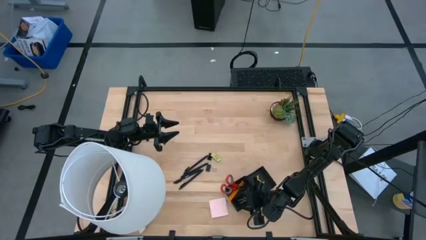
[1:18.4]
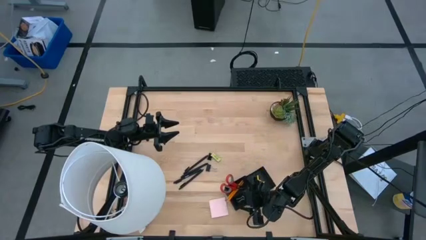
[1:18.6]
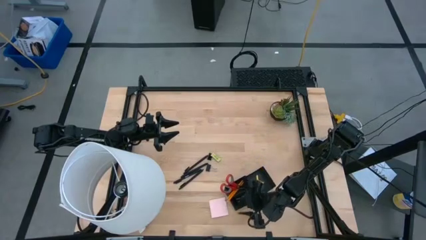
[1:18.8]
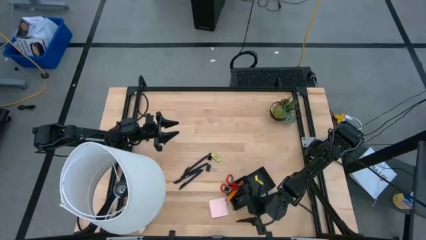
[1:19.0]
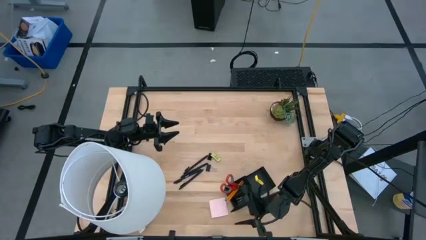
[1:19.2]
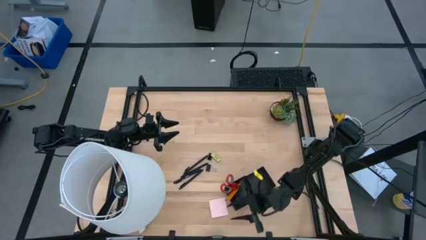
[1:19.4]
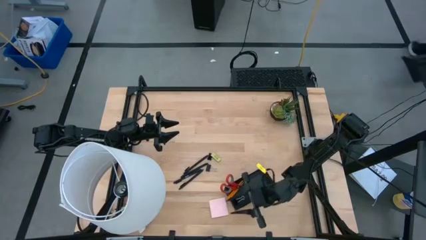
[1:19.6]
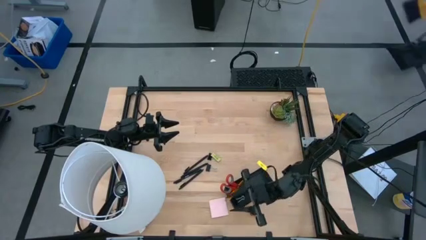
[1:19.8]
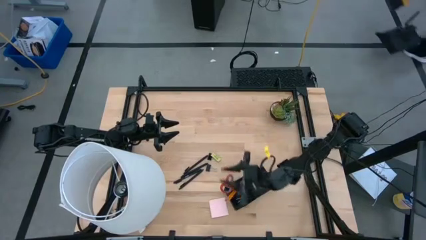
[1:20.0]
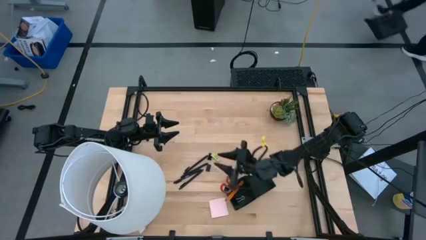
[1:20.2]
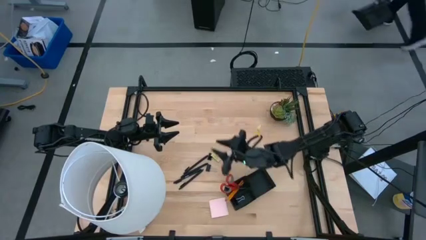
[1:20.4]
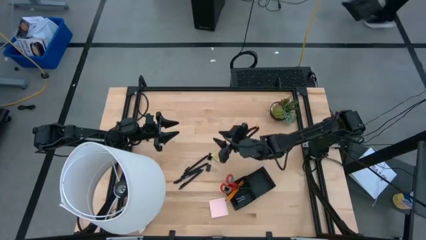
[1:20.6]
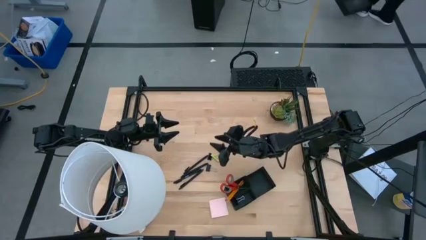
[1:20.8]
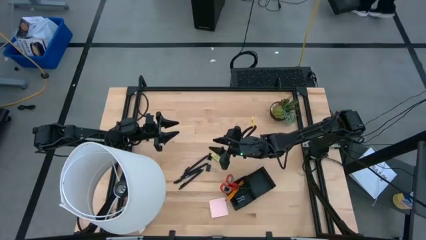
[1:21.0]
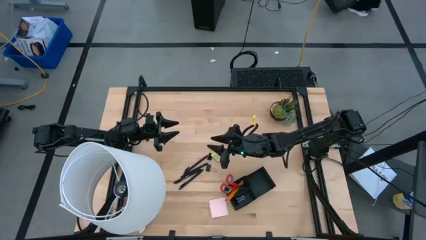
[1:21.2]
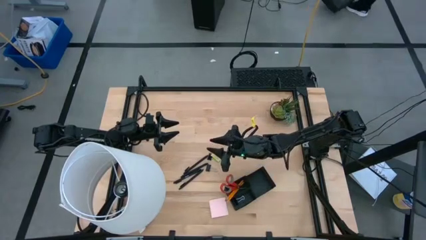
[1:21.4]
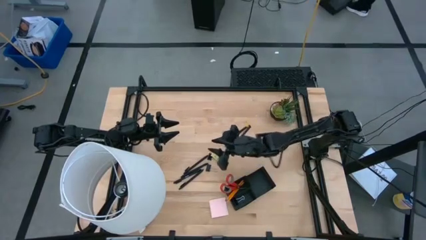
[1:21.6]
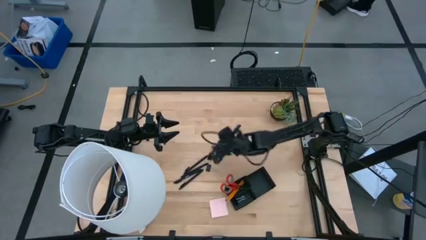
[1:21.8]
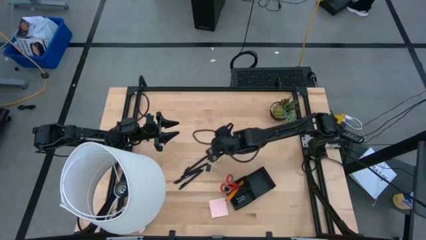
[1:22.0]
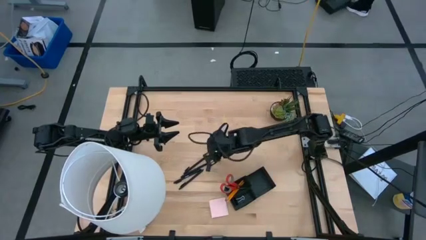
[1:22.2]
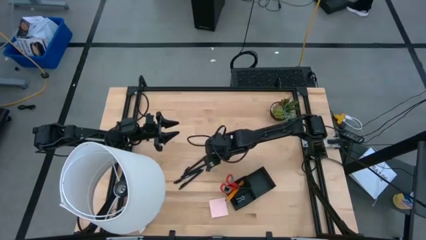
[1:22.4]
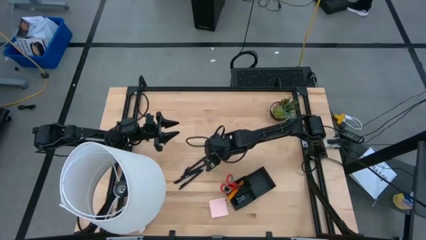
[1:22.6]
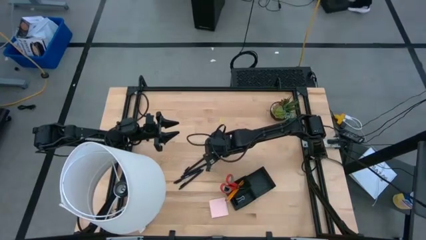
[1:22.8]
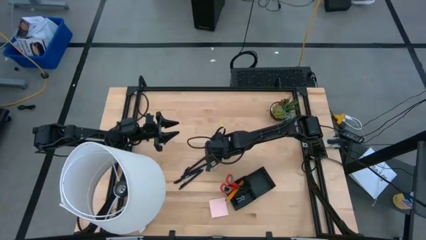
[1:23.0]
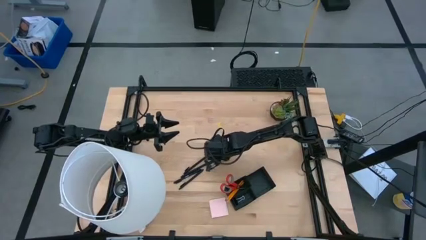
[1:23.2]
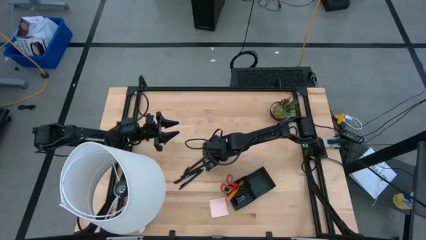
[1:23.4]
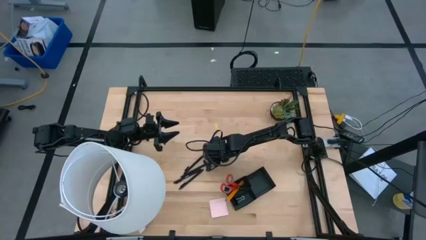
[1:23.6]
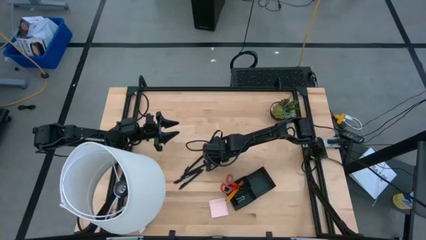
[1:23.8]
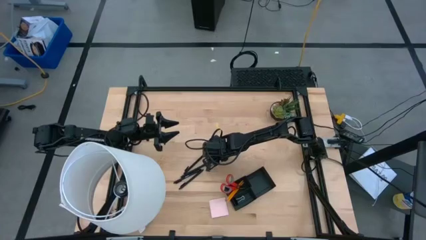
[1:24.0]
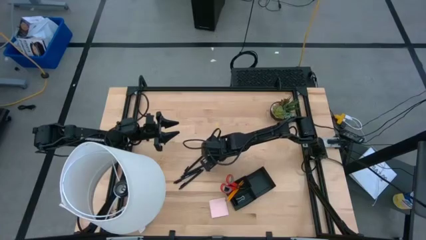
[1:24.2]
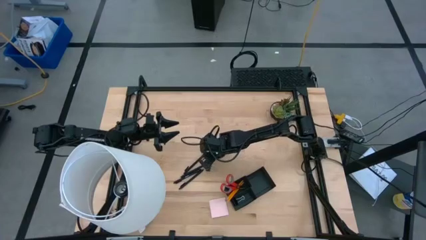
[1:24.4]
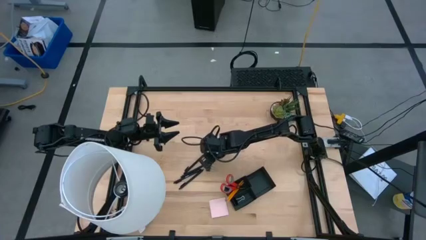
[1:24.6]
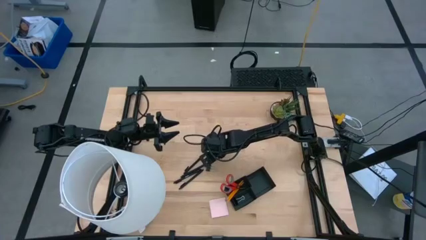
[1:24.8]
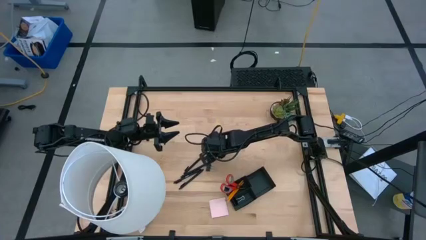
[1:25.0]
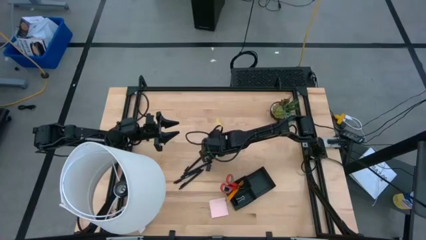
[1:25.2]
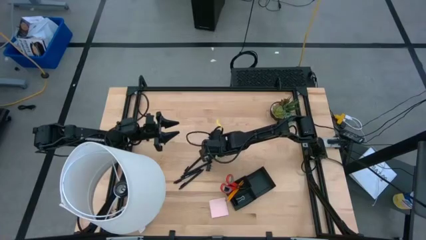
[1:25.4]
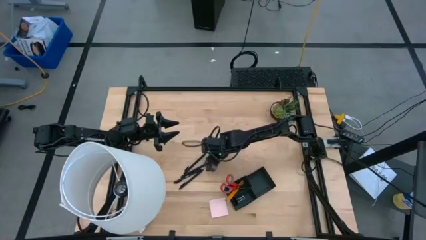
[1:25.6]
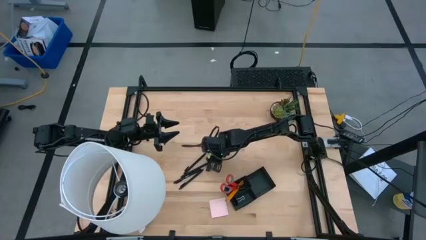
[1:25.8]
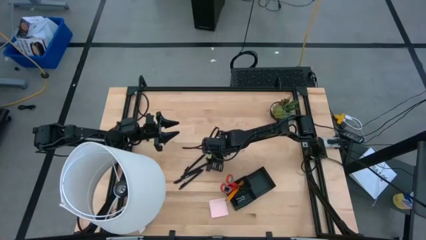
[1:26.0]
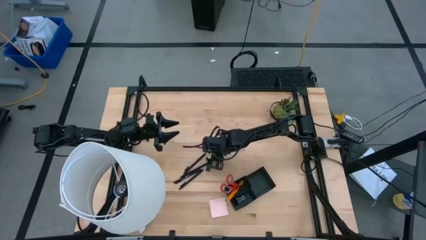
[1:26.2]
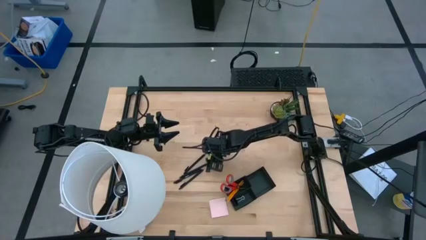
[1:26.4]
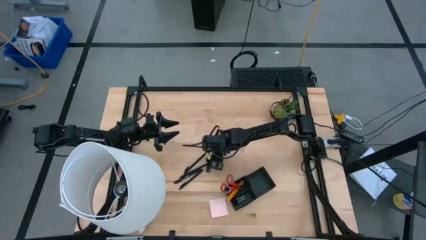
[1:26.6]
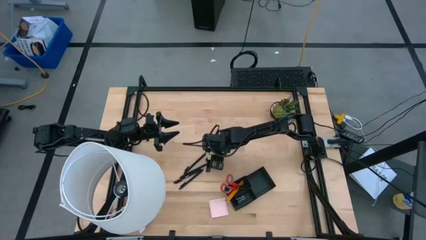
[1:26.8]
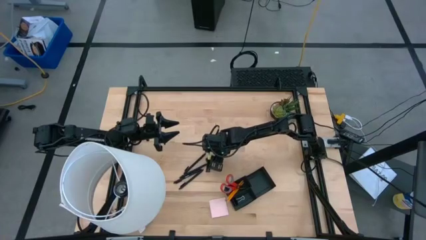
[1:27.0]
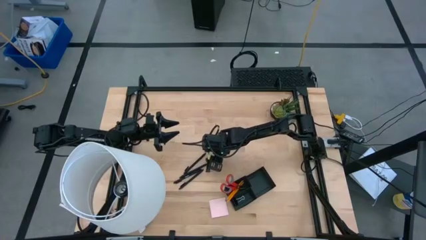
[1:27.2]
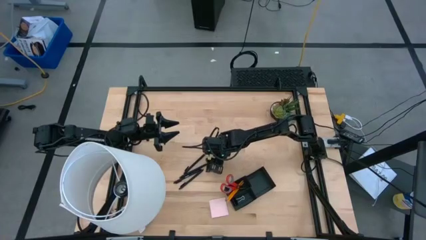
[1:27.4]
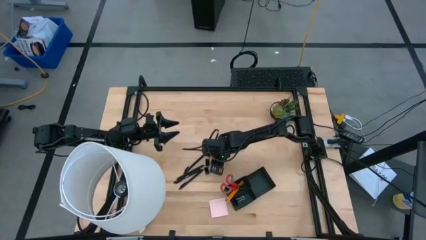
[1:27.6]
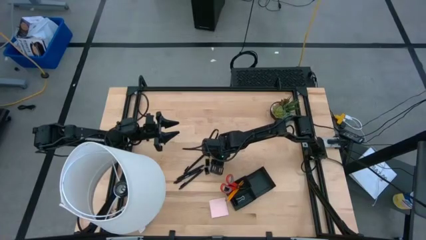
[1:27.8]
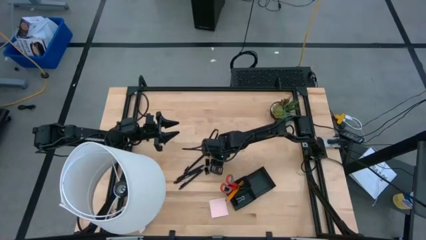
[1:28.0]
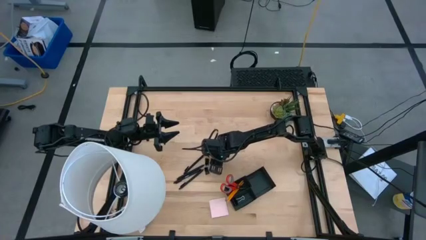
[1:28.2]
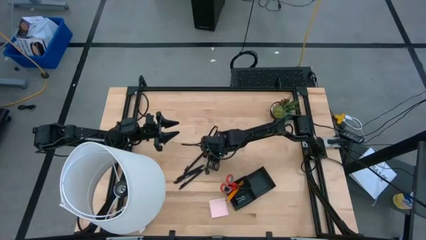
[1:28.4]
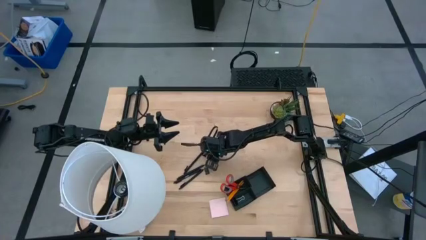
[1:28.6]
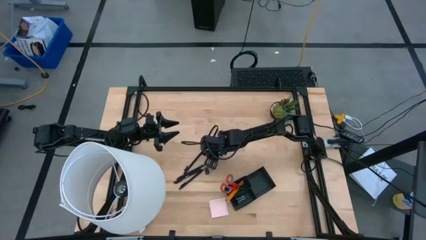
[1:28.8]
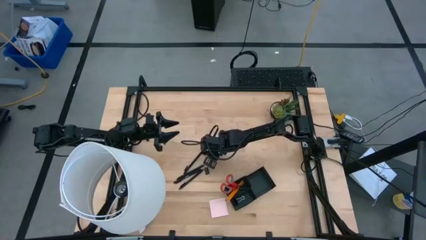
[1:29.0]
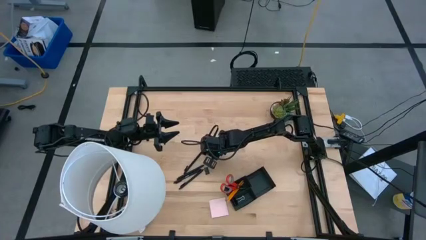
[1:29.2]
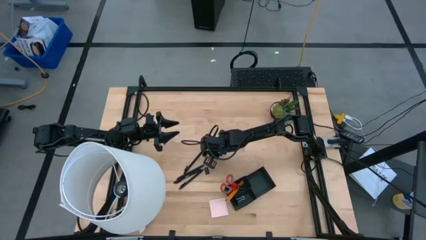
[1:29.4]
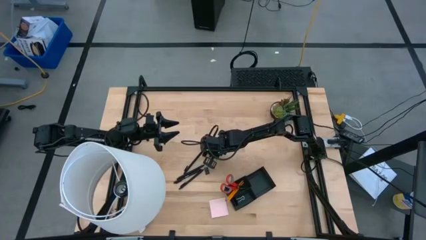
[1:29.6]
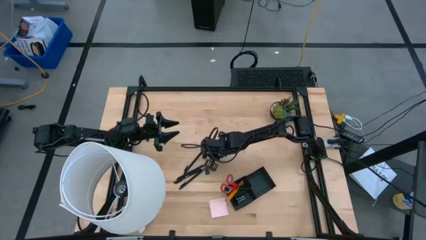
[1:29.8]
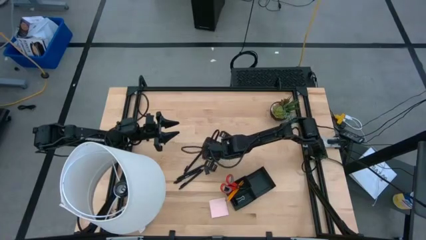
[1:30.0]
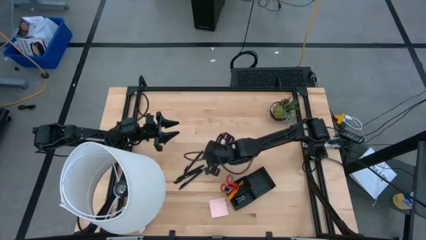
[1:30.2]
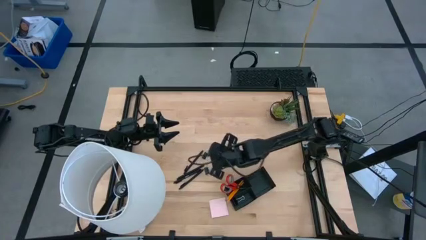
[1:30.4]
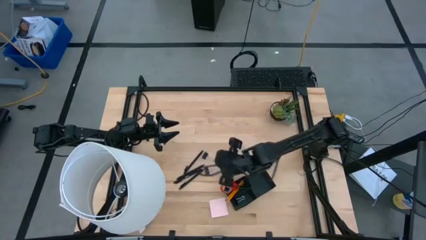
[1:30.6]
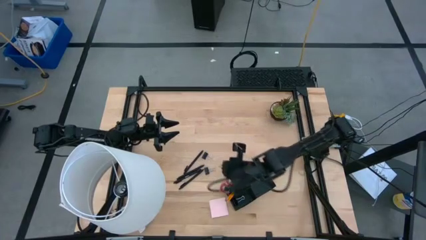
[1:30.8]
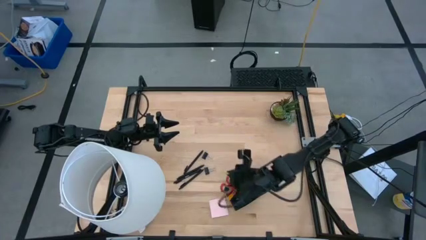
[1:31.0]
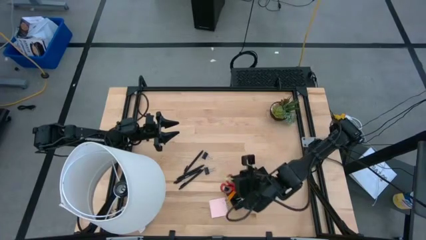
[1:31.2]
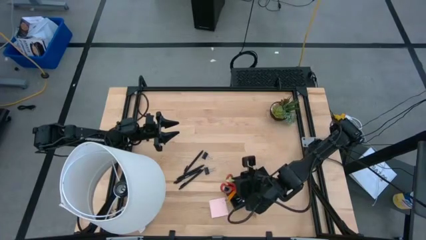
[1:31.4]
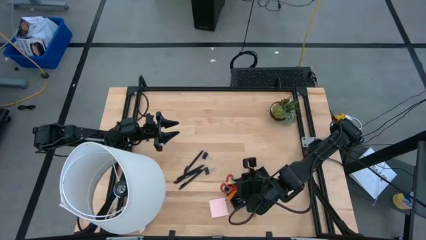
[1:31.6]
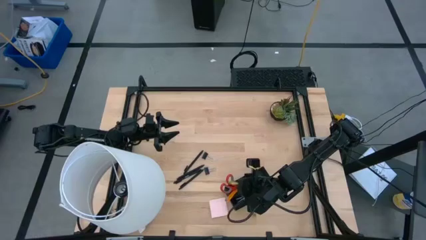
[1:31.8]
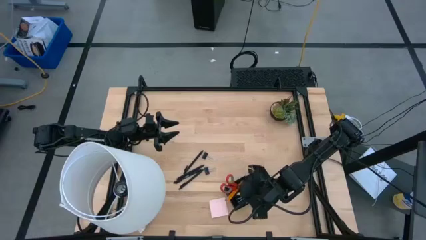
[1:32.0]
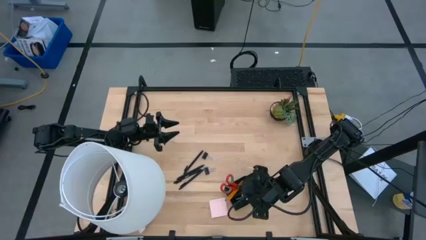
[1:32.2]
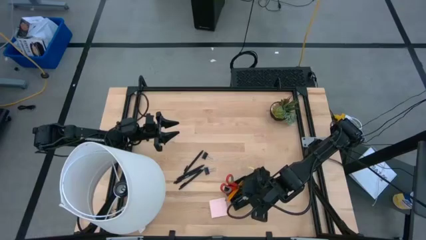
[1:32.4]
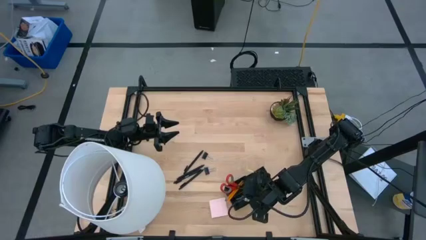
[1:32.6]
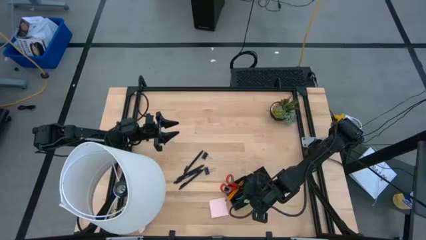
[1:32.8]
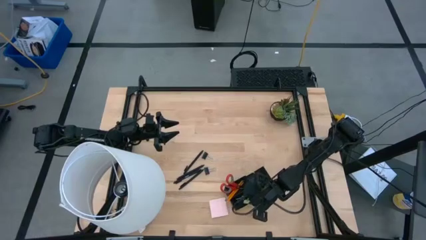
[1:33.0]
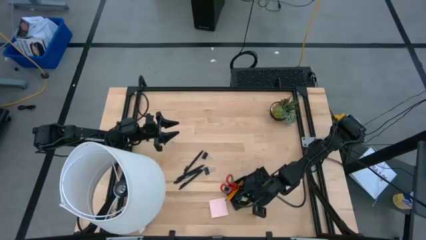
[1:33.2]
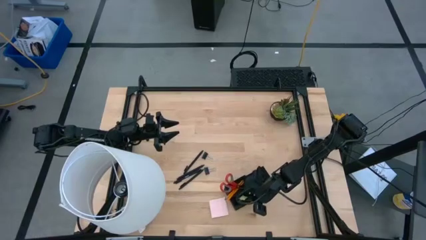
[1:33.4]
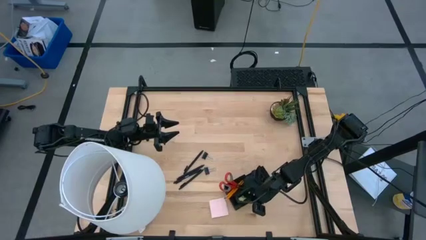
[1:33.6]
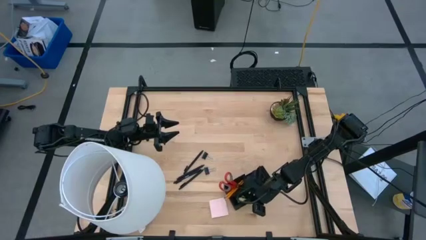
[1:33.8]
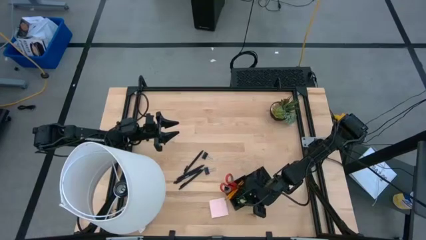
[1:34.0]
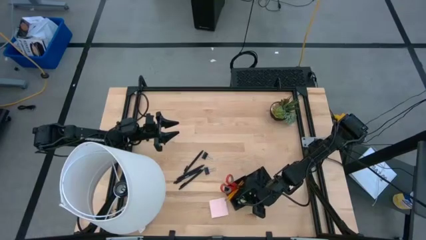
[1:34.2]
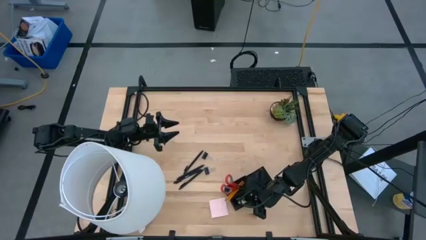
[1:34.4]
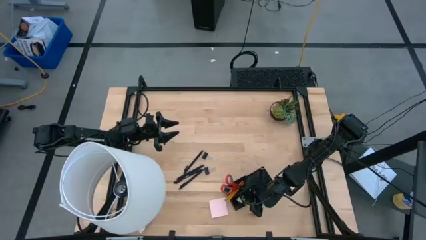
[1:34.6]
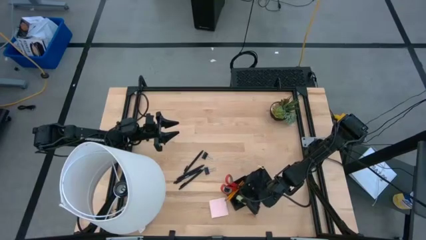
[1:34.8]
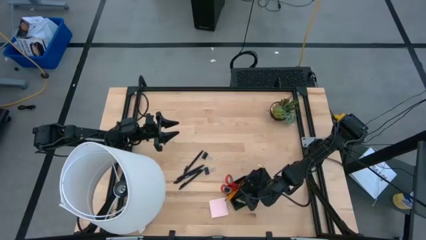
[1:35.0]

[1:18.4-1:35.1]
Task: Pick and place office supplies into organizer
Put the yellow eraser into the black desk organizer
